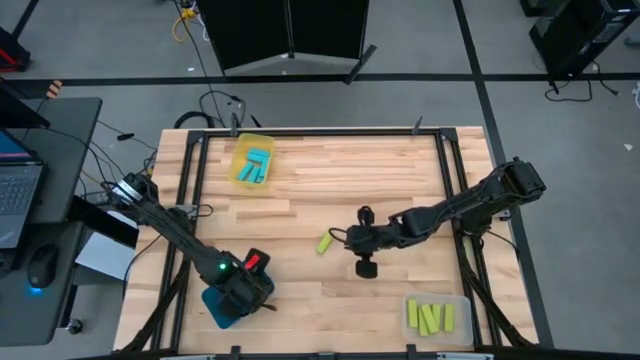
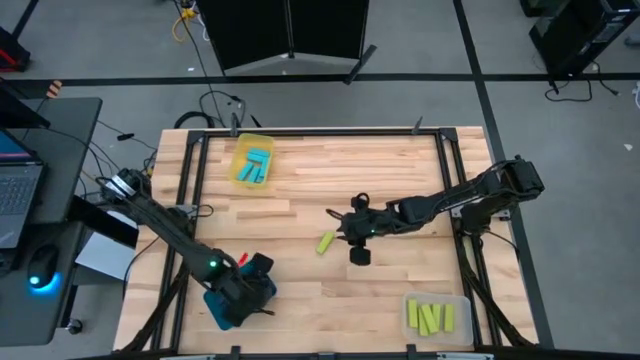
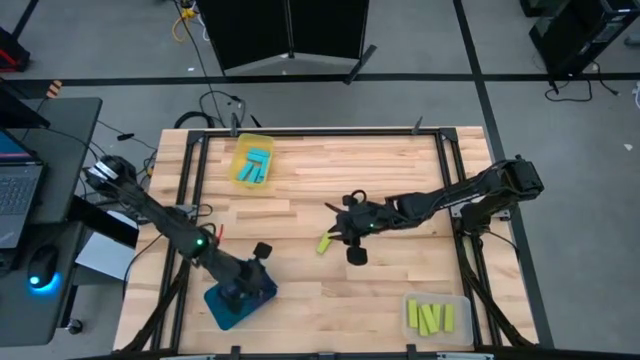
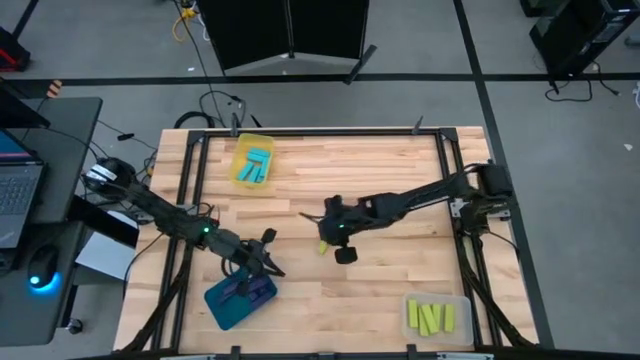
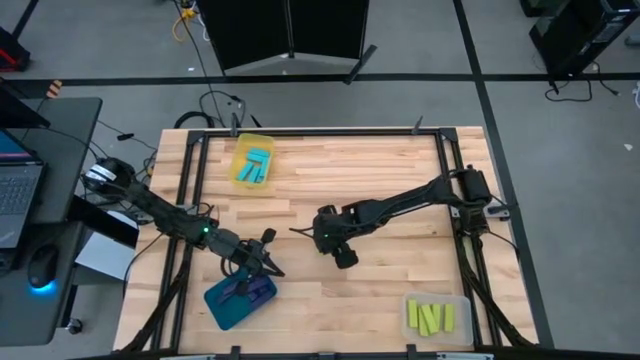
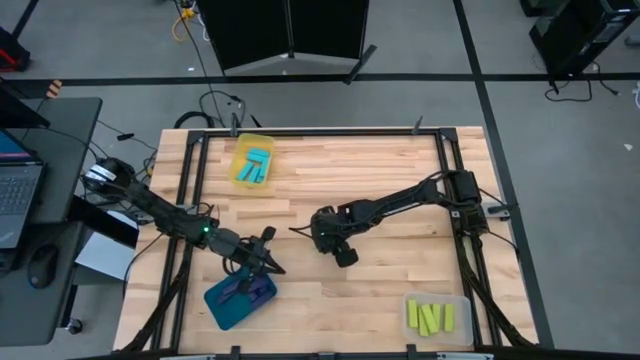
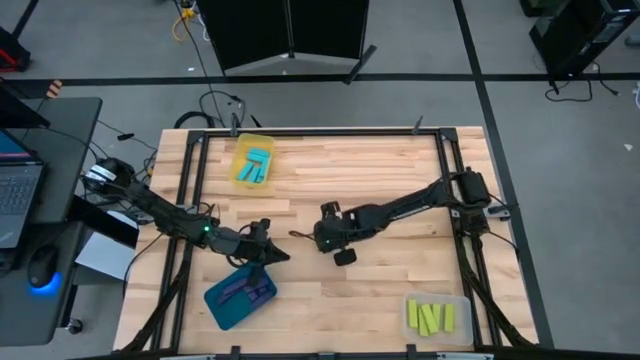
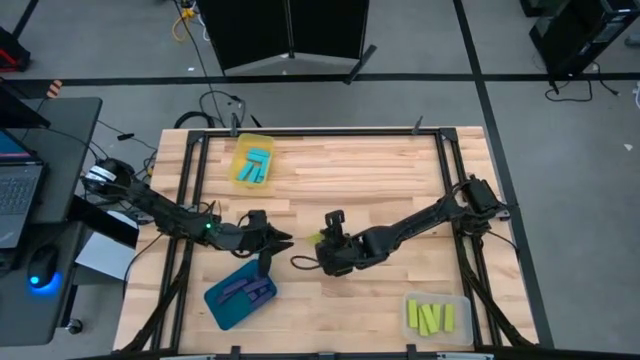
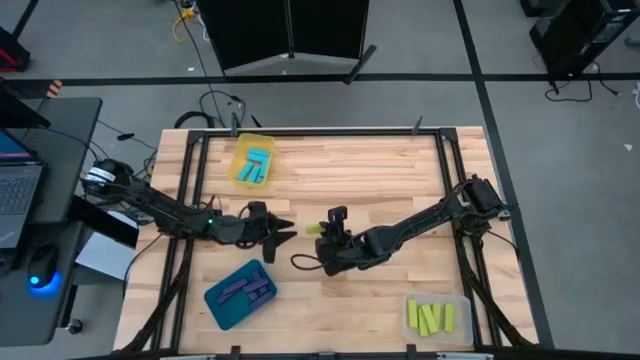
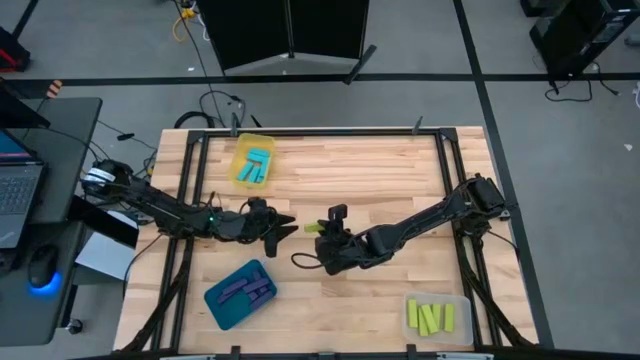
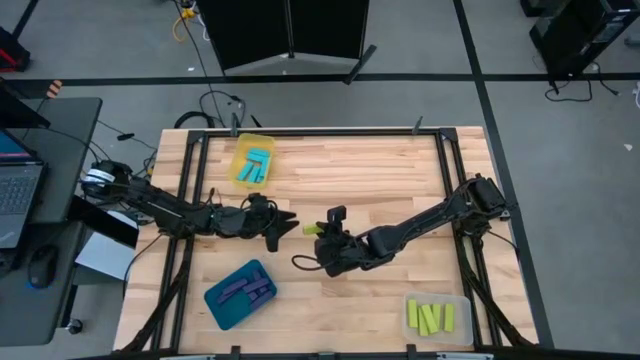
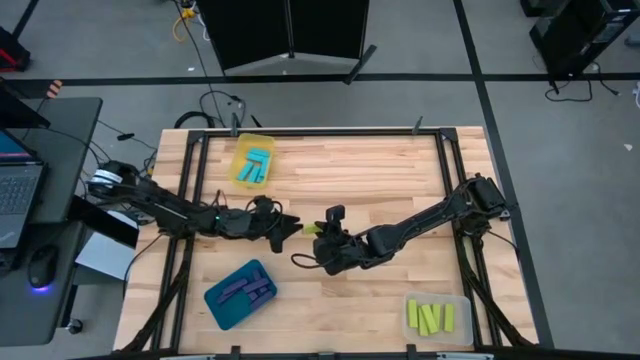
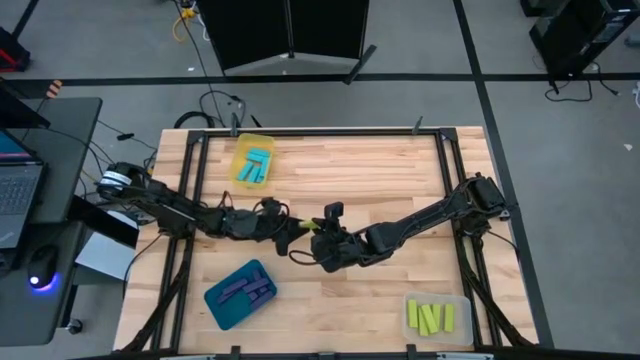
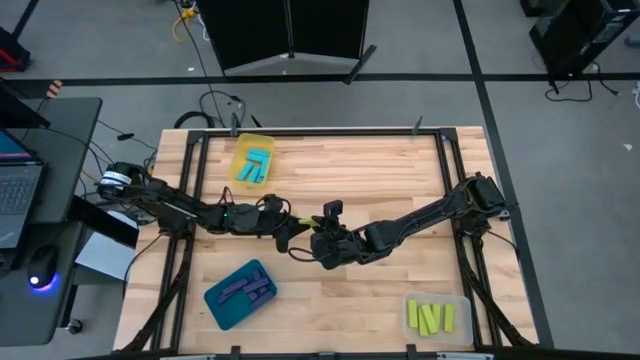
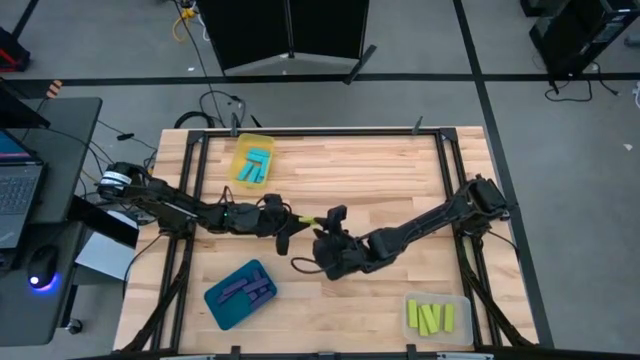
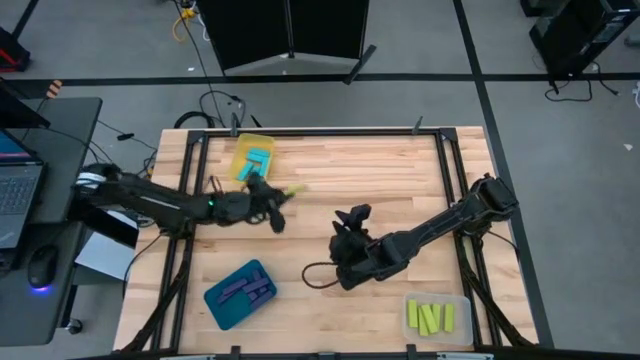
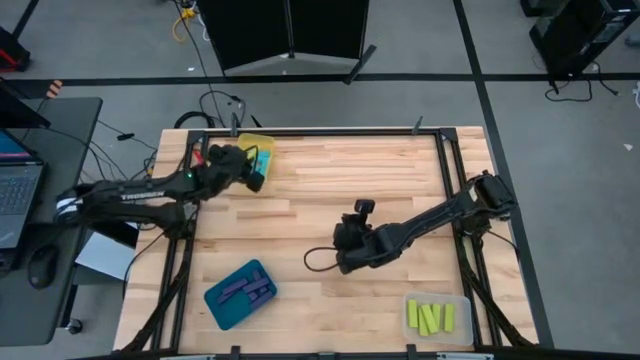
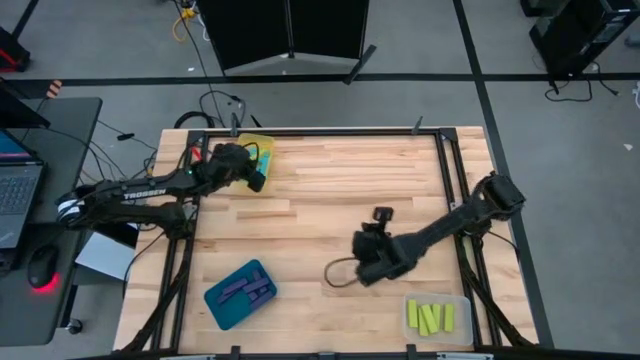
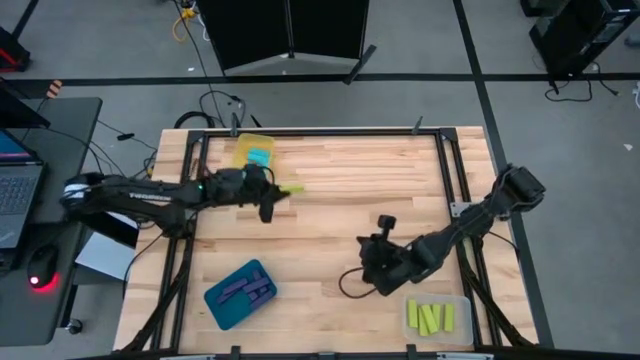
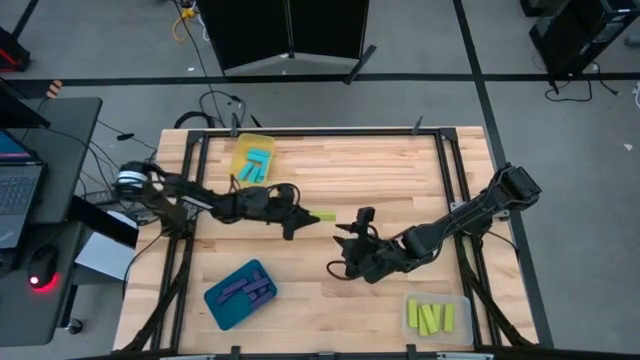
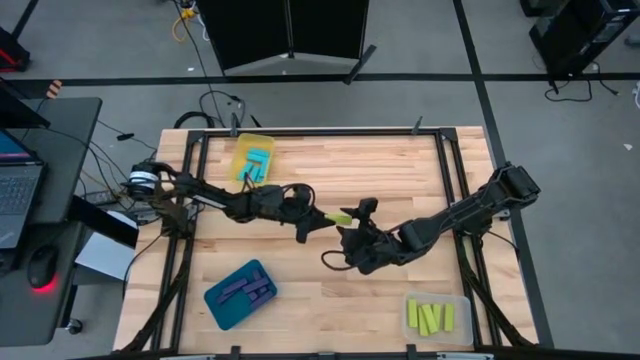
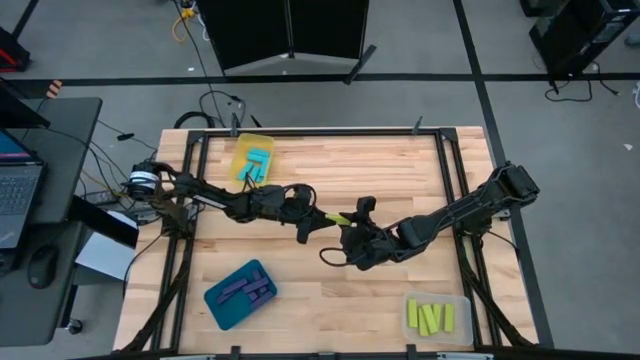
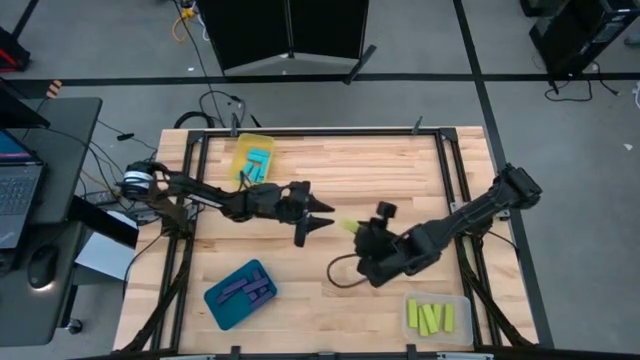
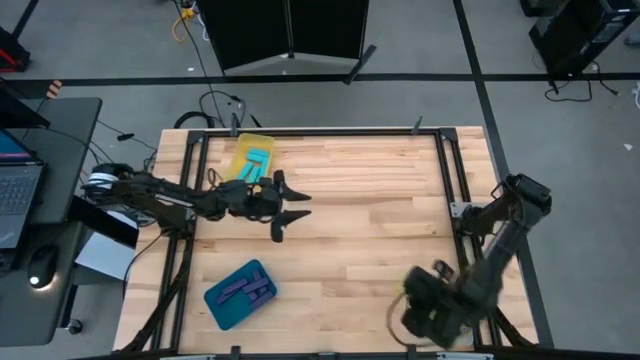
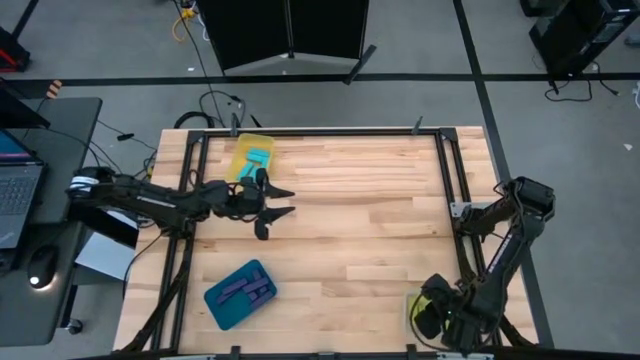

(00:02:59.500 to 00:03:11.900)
Task: Sort blocks
Put the green block into the transparent bin

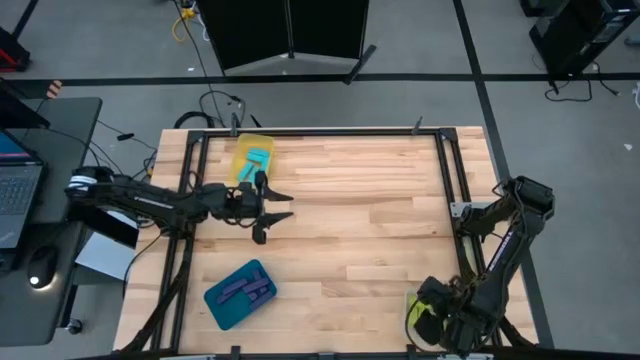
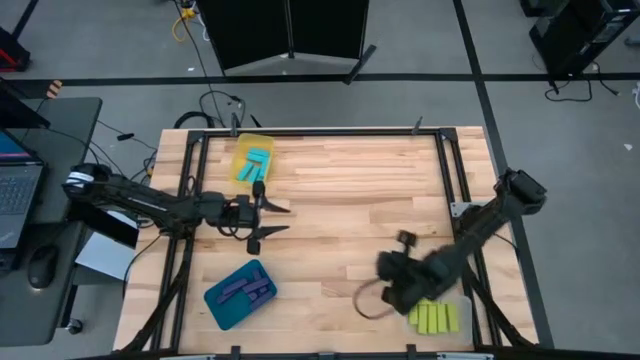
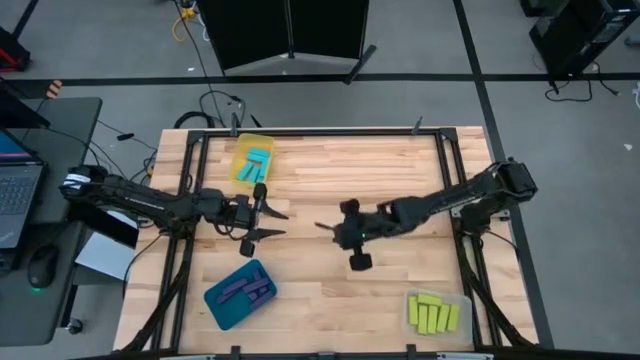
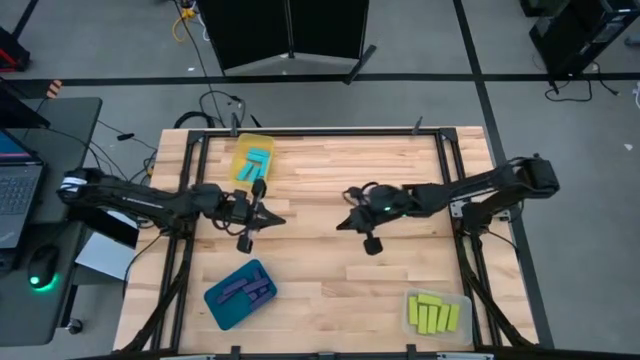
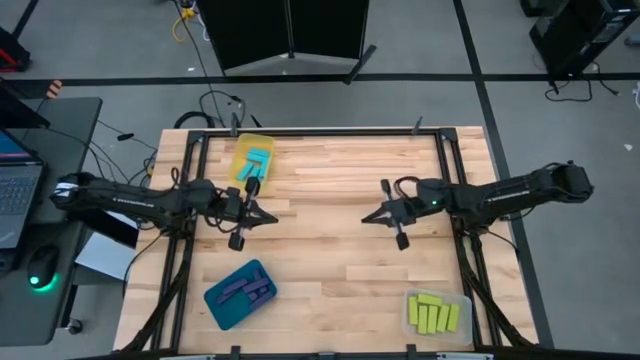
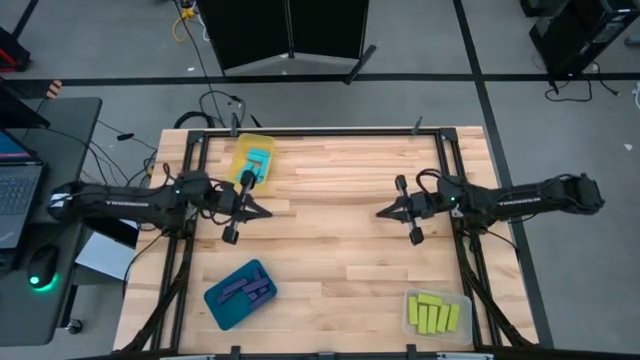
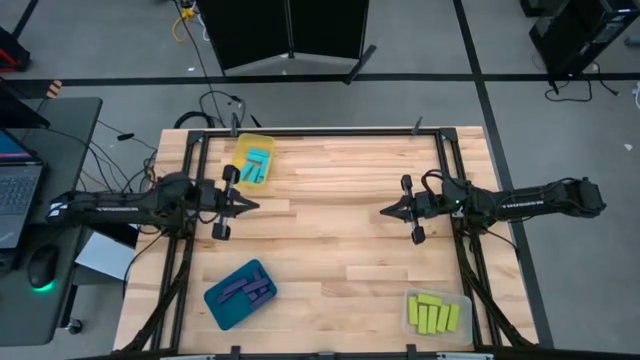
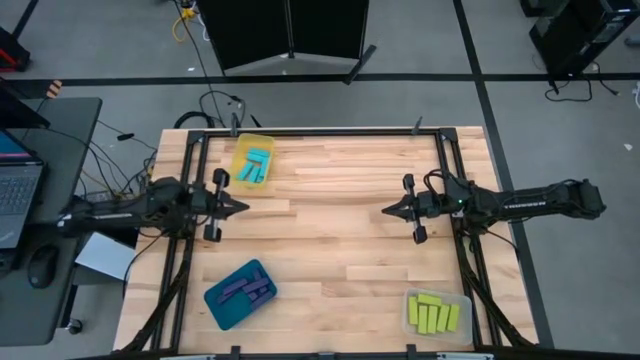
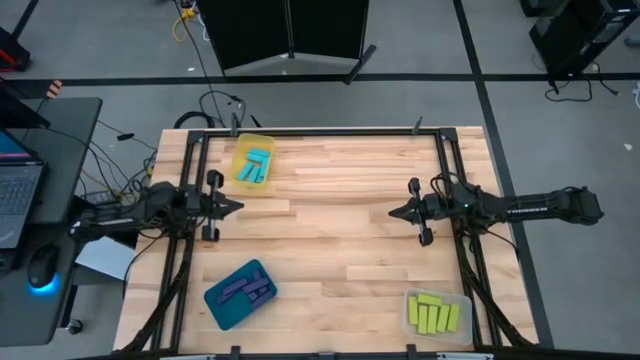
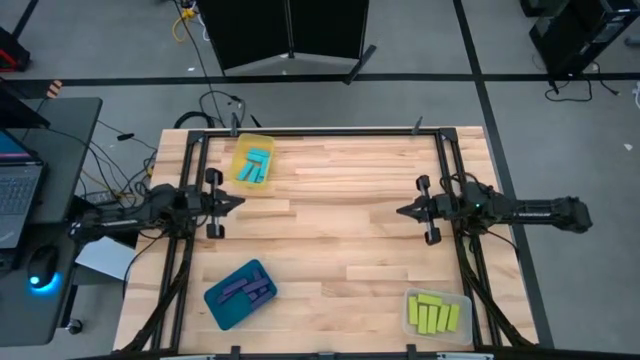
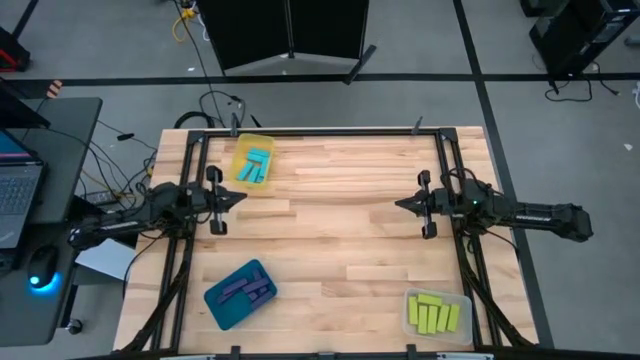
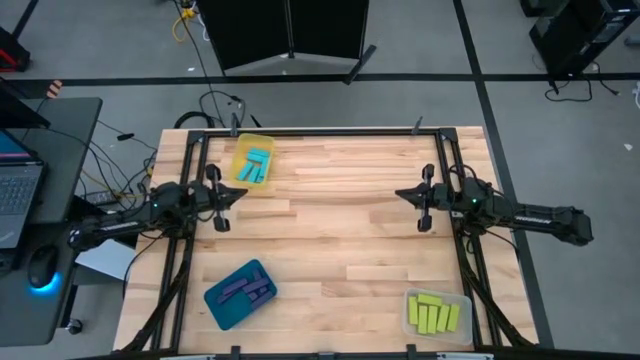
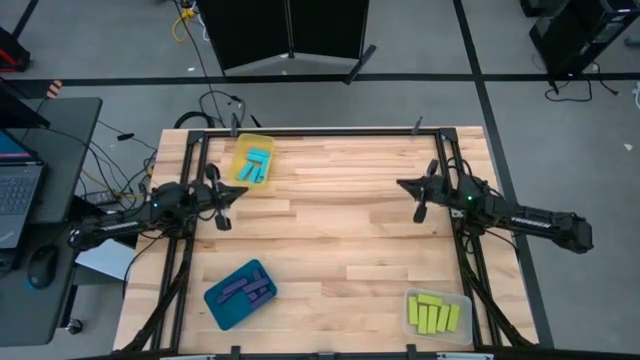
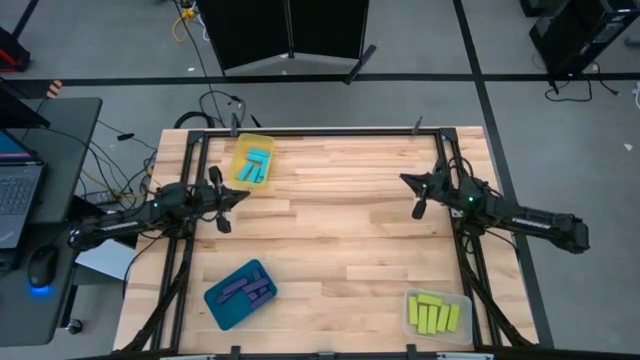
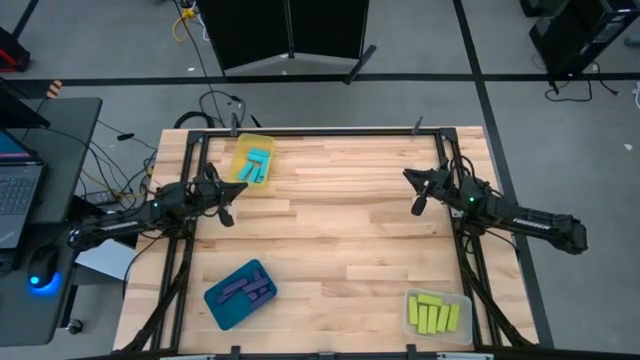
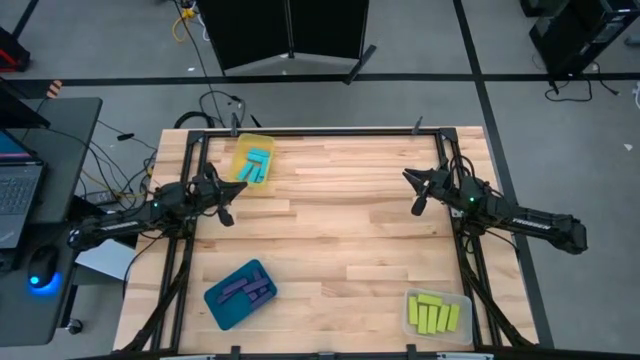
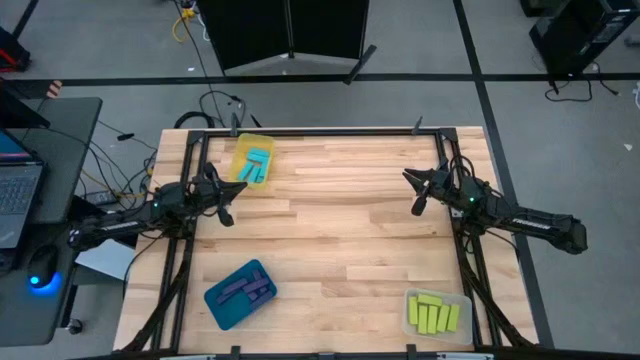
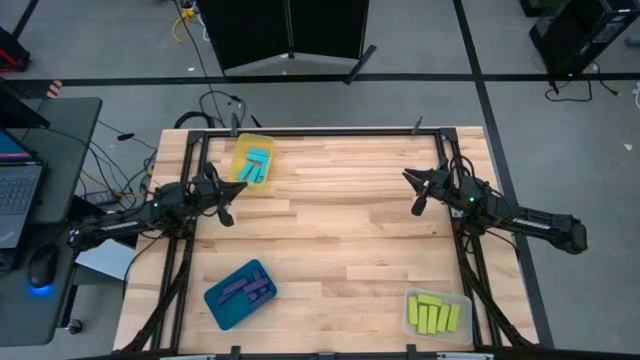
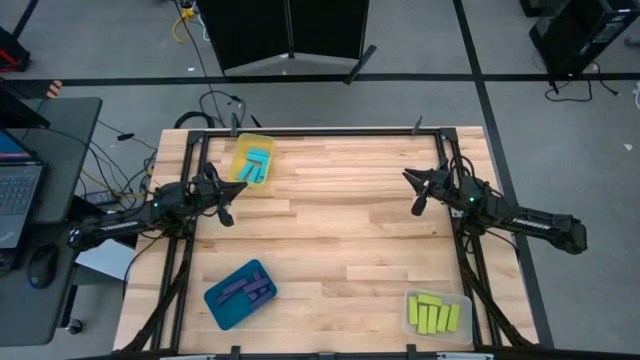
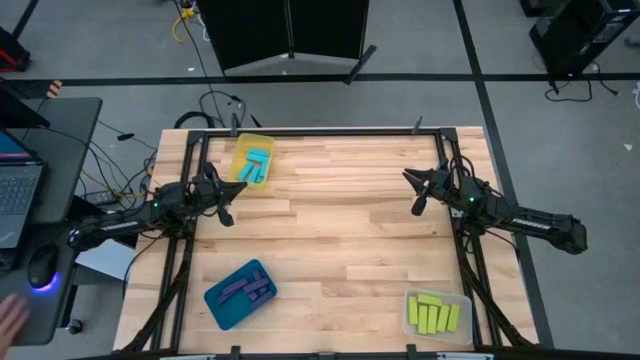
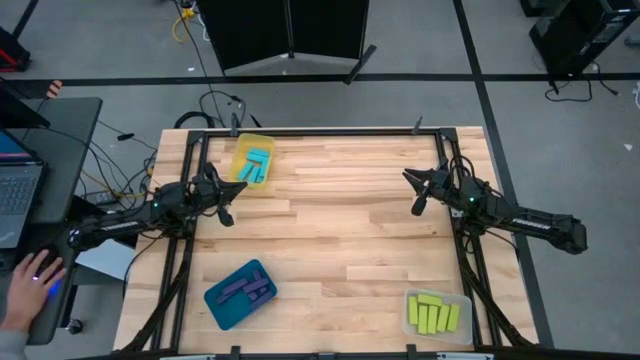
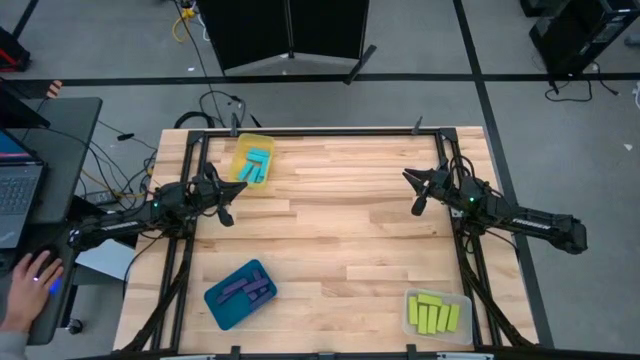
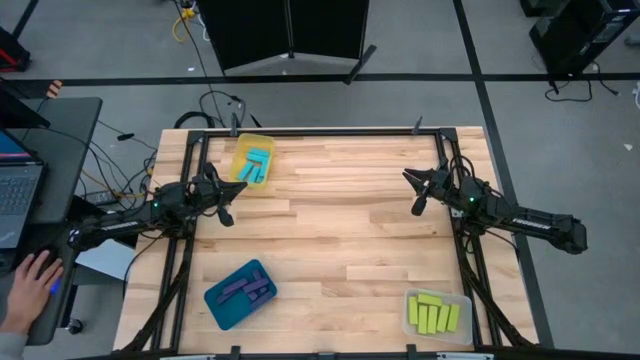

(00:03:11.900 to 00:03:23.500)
Return to Home Position
